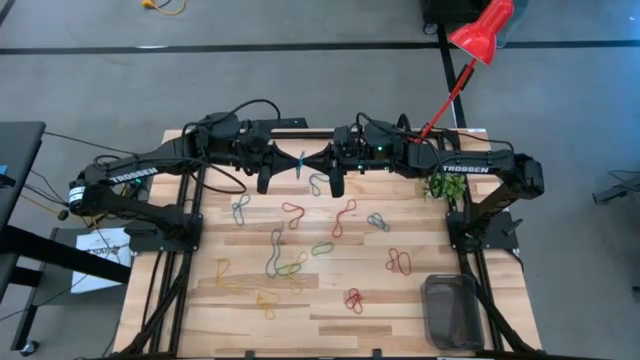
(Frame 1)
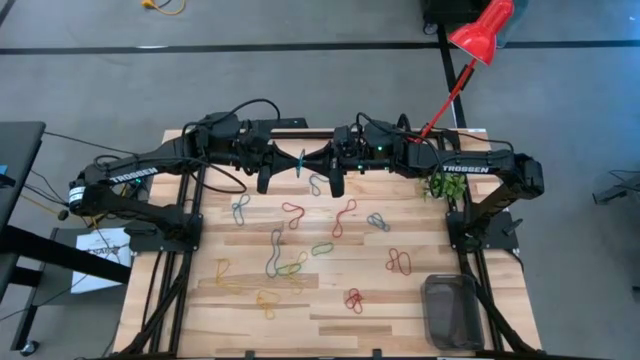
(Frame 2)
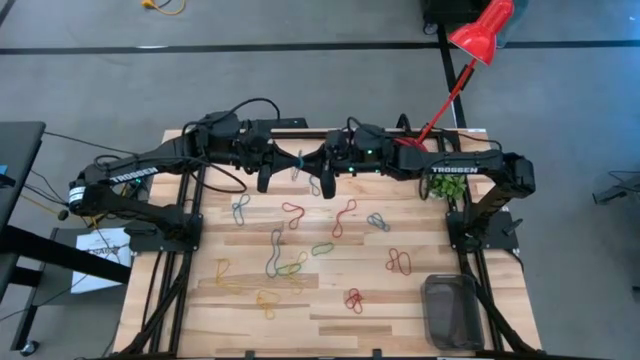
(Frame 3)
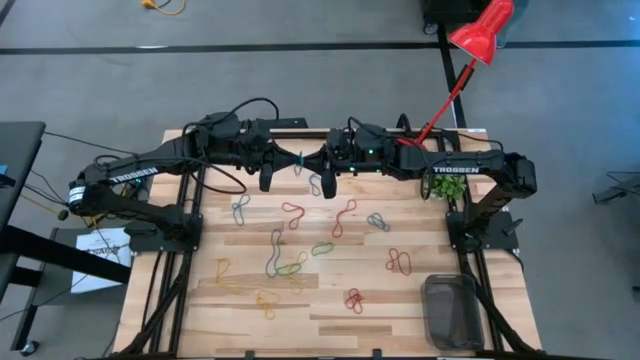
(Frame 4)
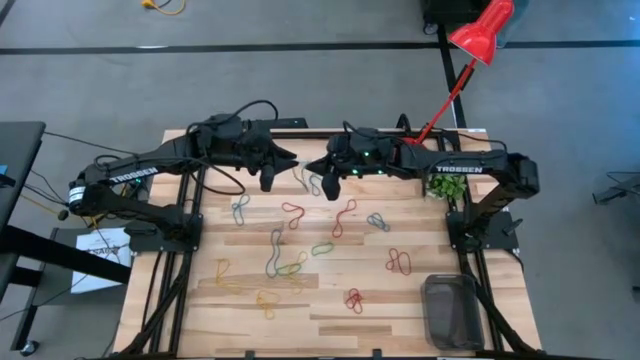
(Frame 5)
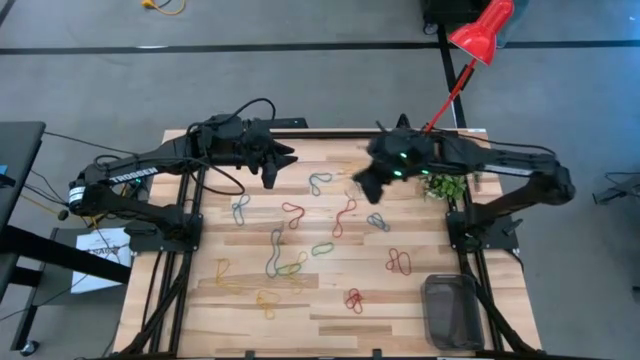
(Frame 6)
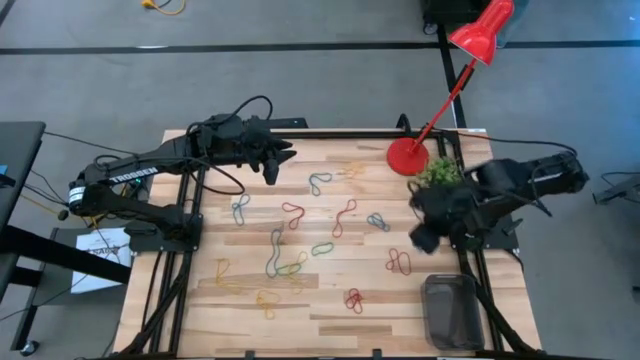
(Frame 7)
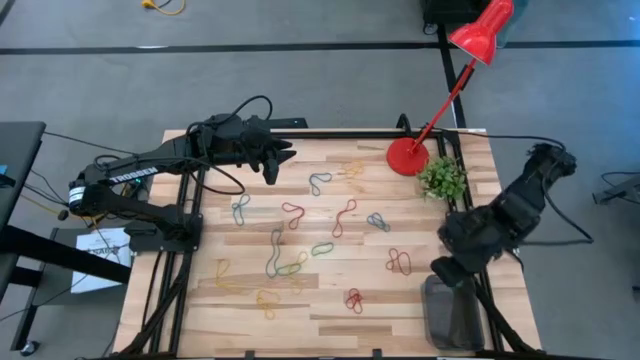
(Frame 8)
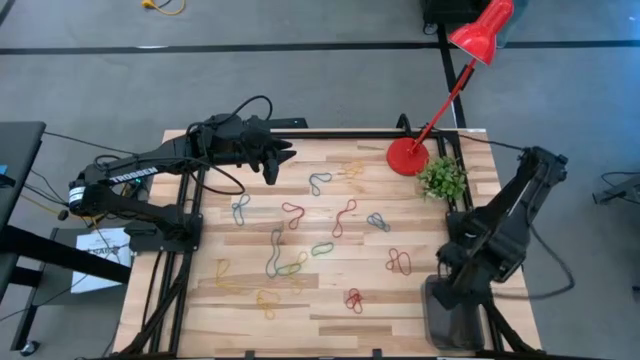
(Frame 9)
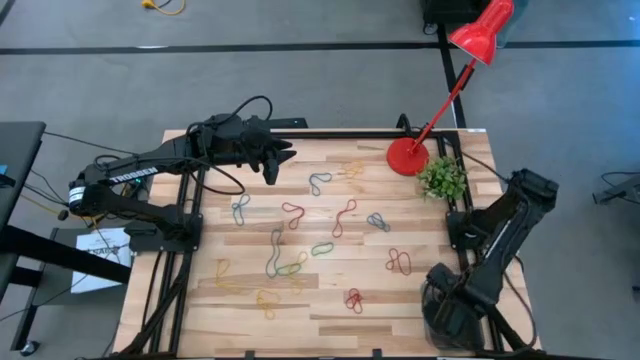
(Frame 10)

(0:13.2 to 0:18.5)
Task: Pick and place items into bin
Put the blue rubber band into the black bin

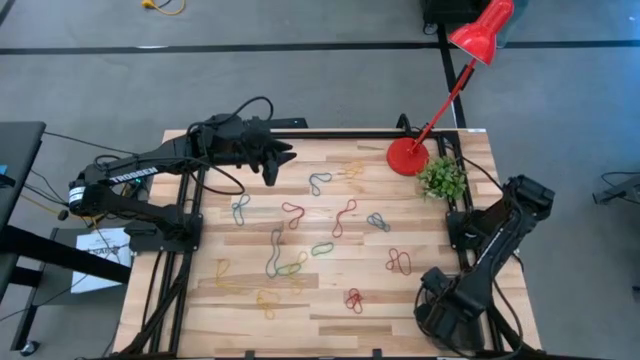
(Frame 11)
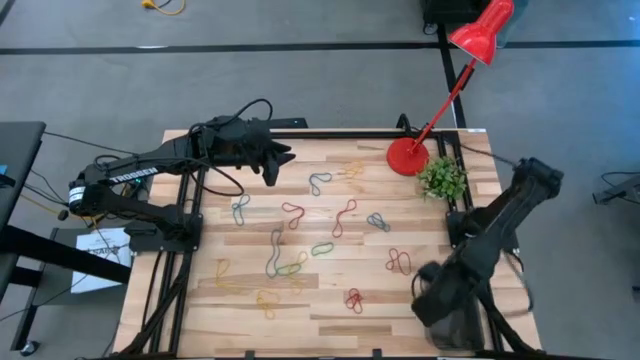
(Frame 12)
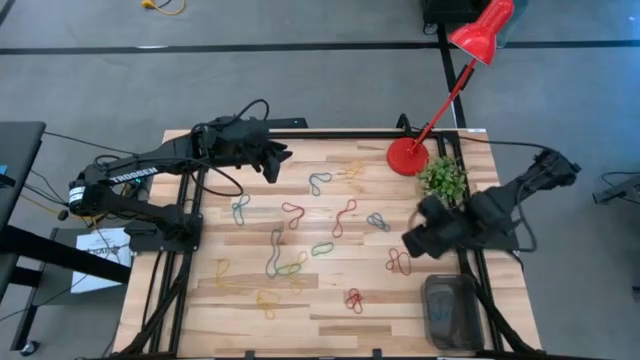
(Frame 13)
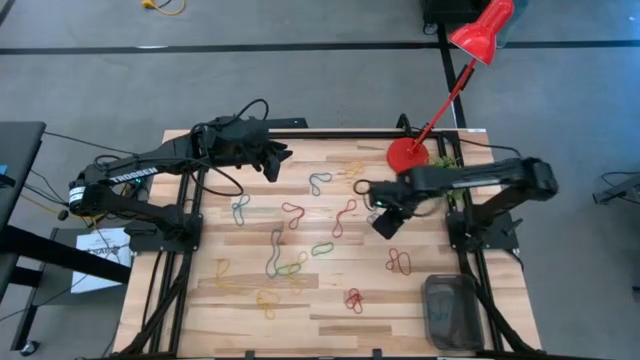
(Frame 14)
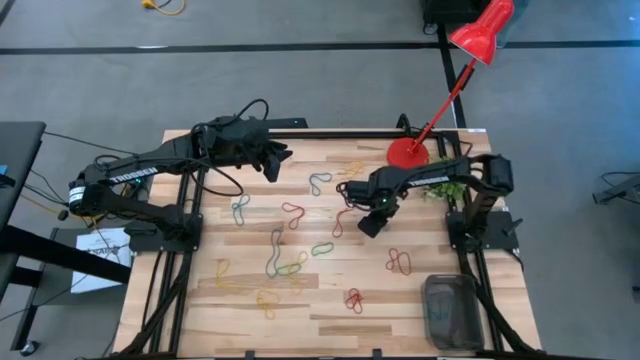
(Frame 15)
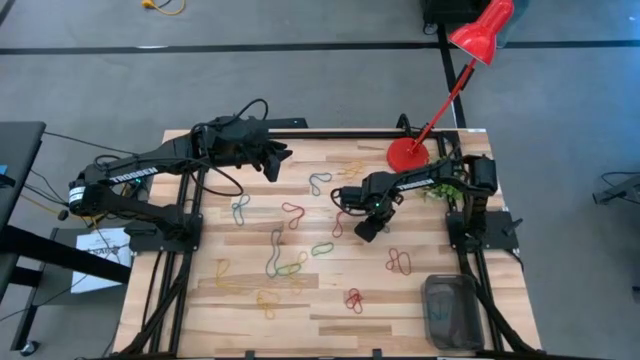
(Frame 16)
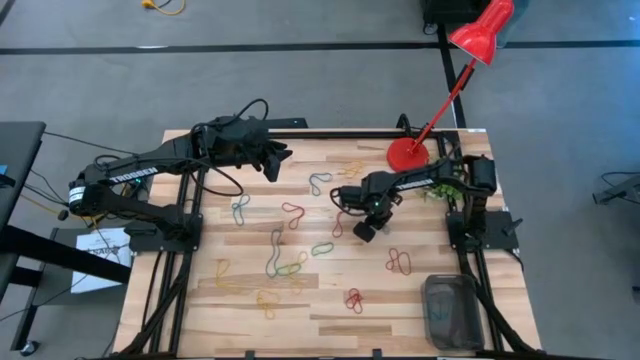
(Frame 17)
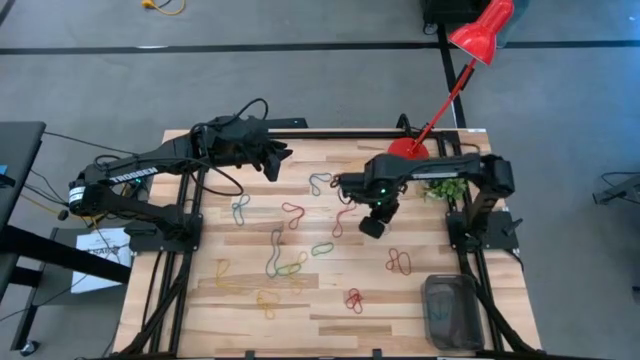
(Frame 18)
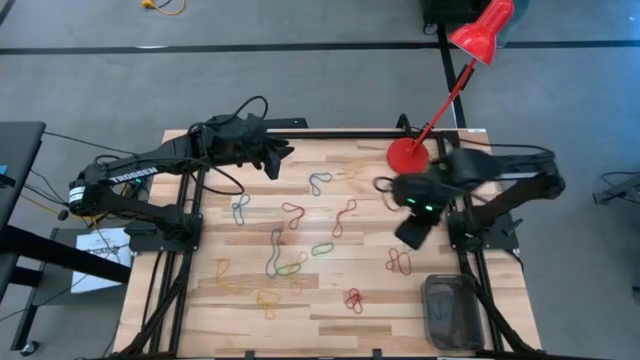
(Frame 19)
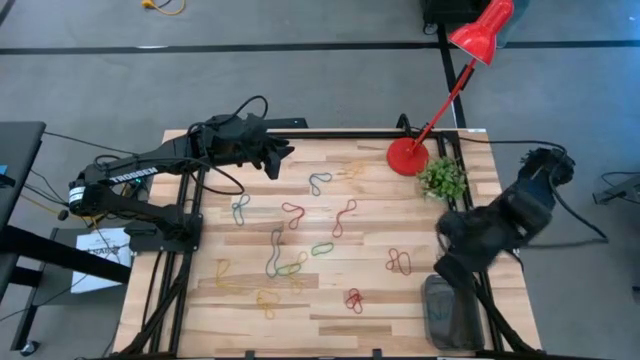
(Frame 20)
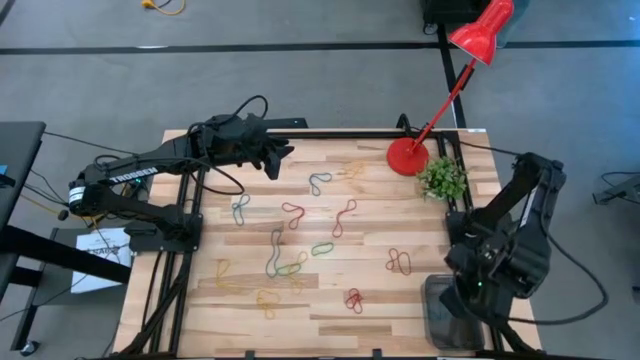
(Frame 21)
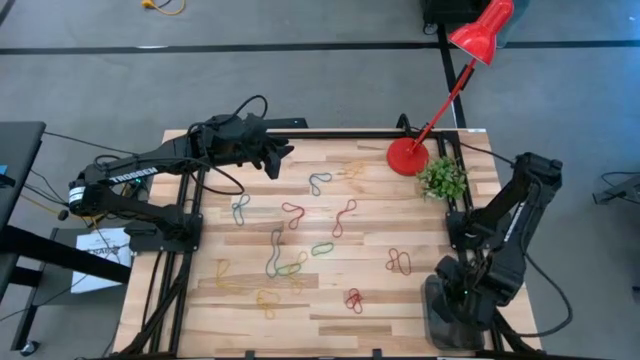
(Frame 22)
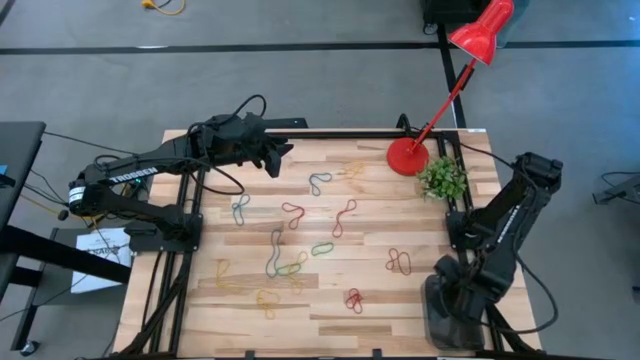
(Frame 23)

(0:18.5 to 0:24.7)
Put the blue rubber band into the black bin

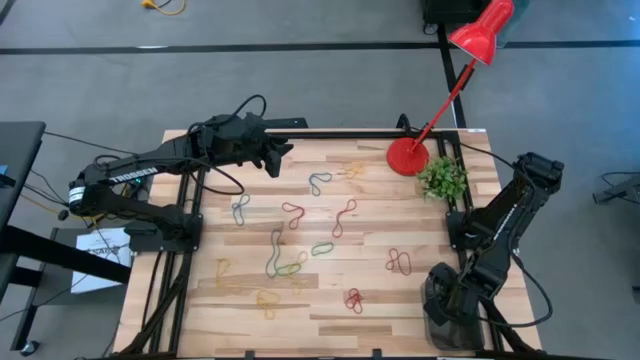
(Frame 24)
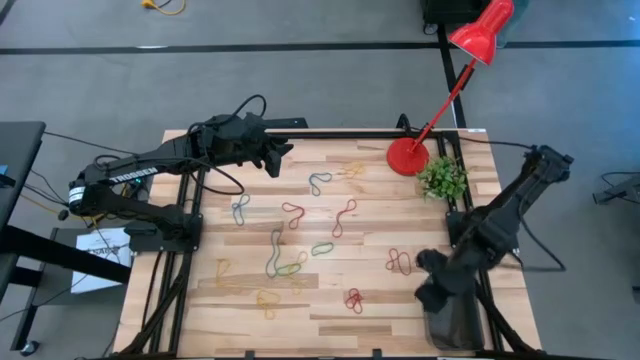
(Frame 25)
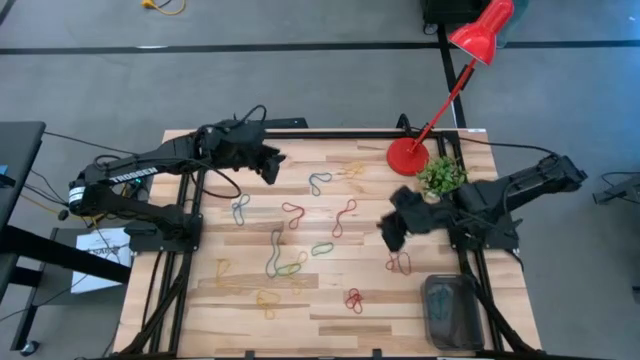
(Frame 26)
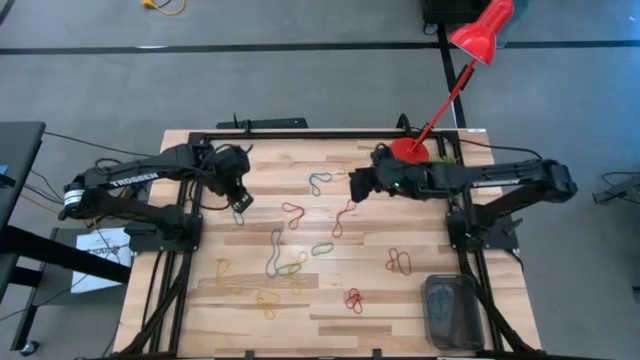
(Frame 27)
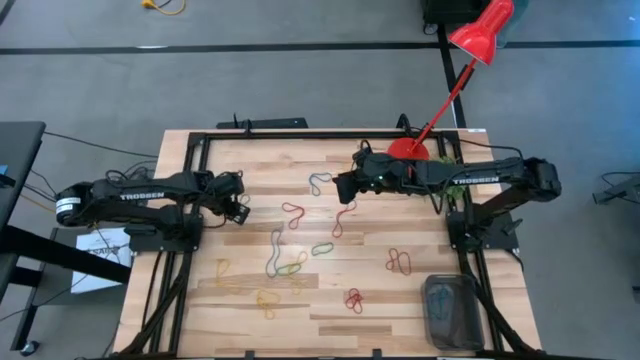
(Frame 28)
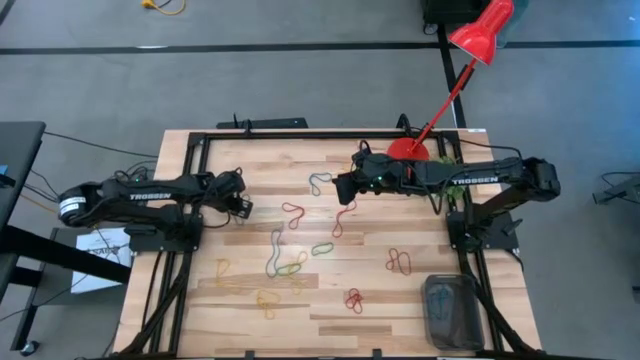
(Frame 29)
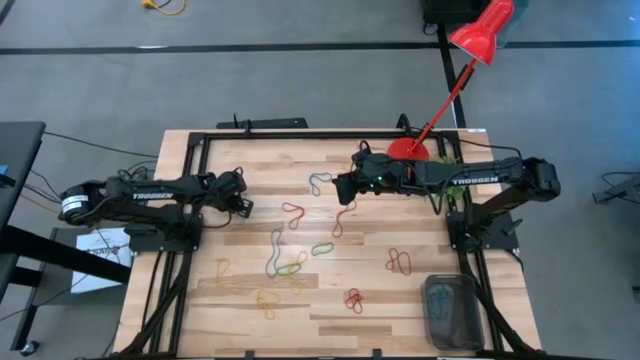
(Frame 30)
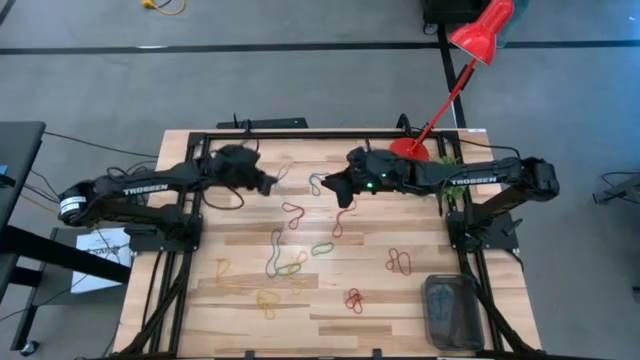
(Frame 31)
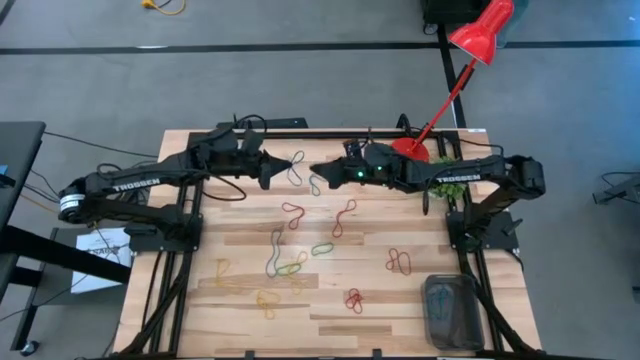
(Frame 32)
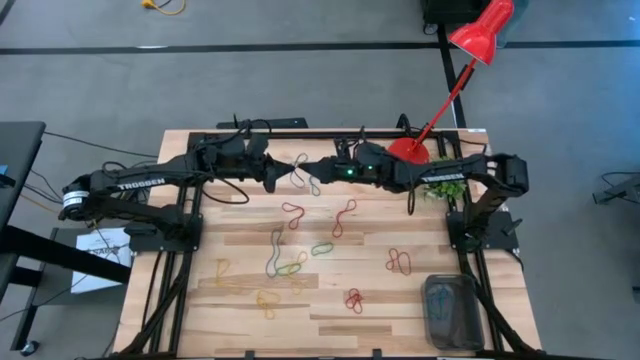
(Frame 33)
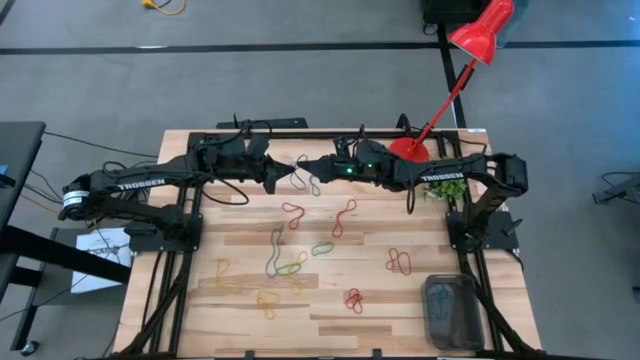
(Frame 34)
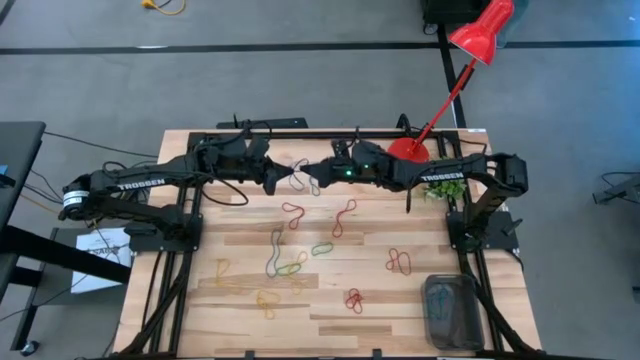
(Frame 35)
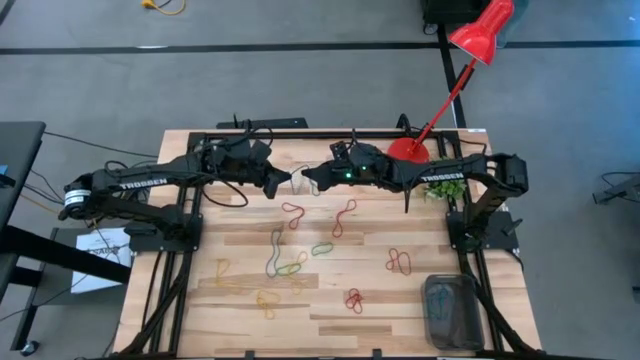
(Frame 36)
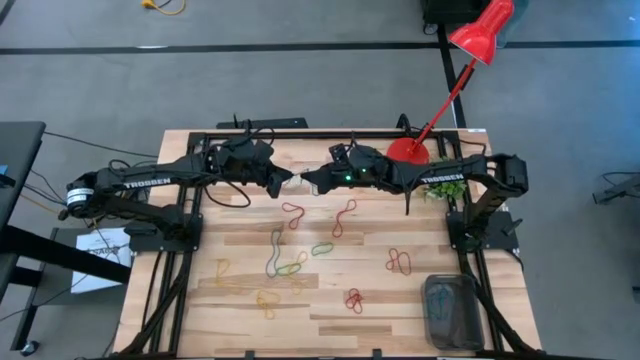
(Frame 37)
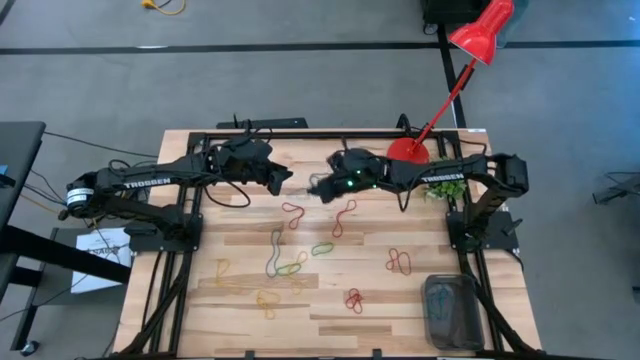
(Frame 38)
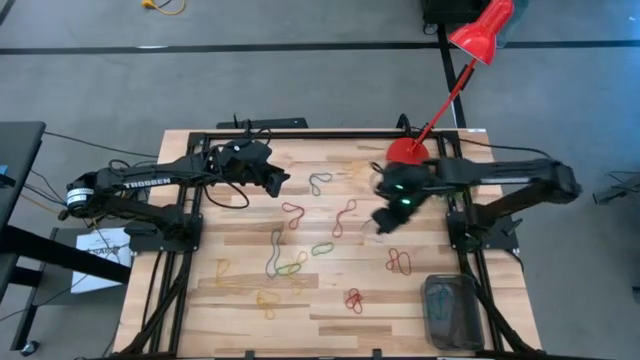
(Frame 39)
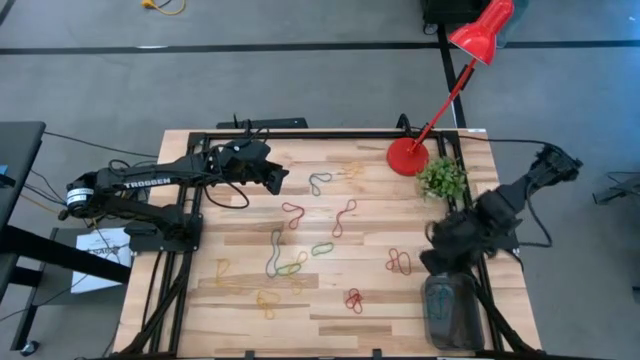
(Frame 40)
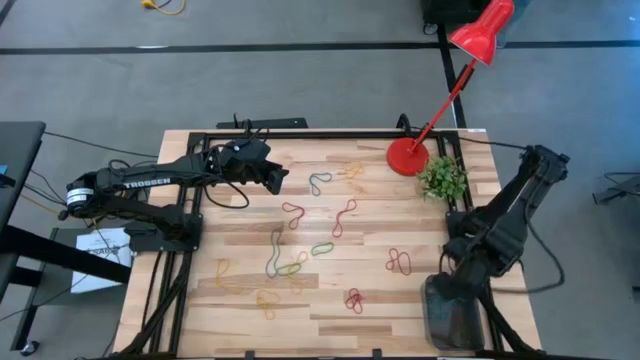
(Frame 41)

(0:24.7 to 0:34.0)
Put the blue rubber band into the black bin
